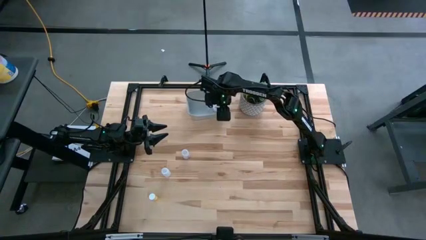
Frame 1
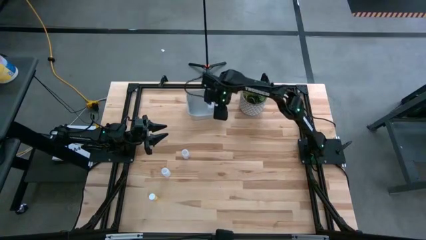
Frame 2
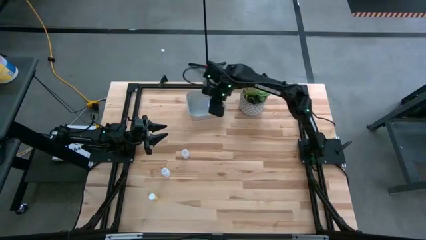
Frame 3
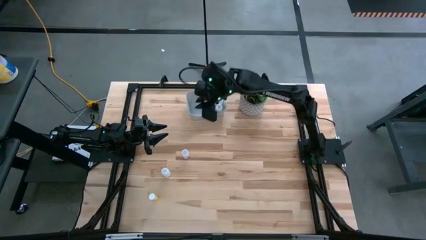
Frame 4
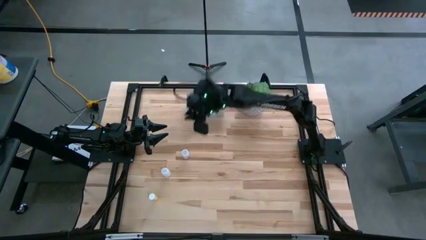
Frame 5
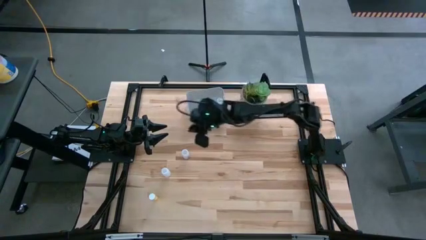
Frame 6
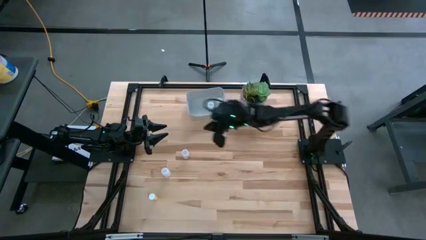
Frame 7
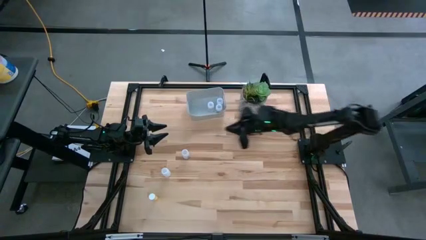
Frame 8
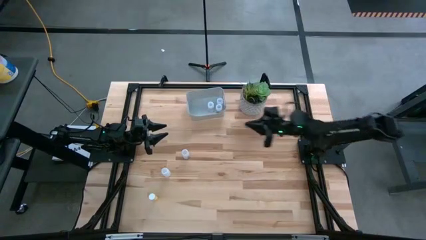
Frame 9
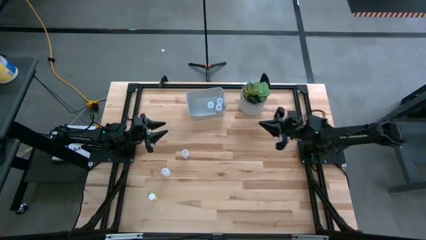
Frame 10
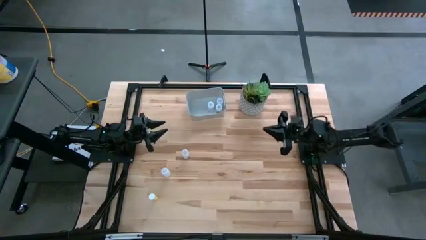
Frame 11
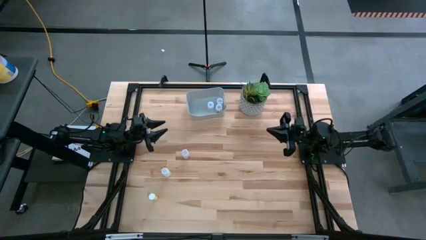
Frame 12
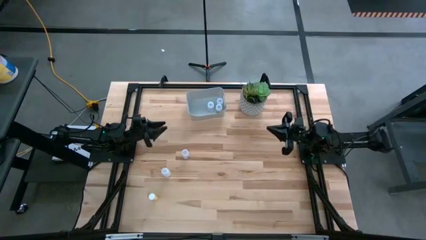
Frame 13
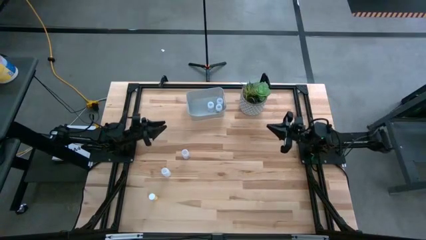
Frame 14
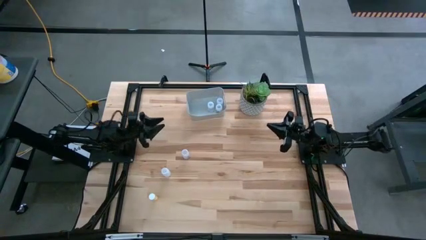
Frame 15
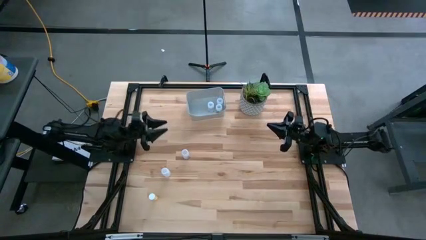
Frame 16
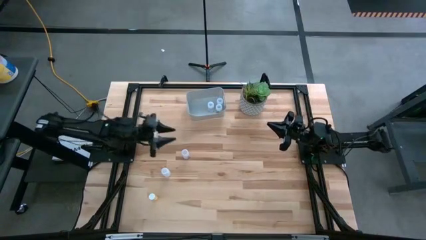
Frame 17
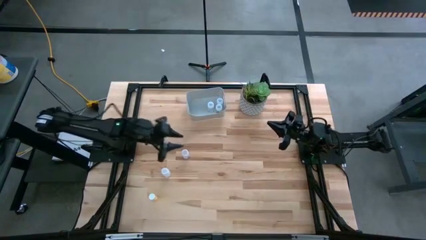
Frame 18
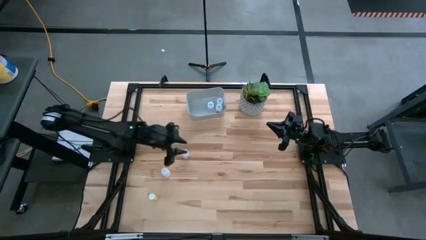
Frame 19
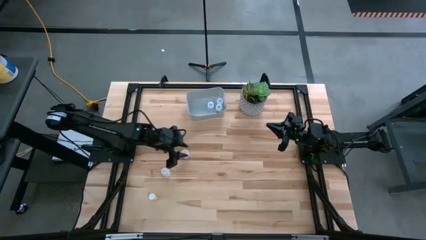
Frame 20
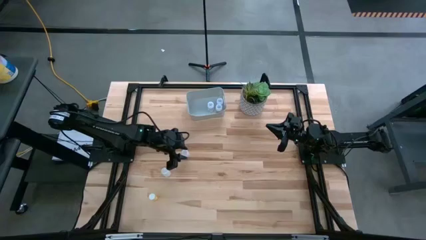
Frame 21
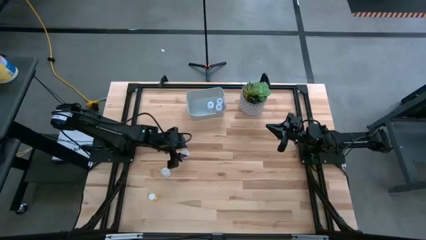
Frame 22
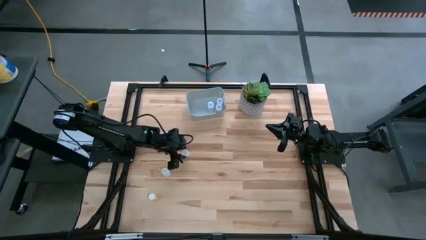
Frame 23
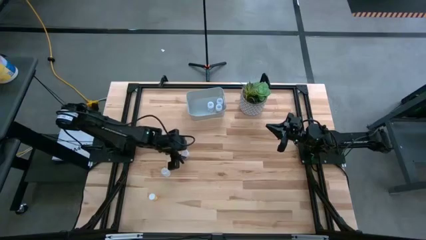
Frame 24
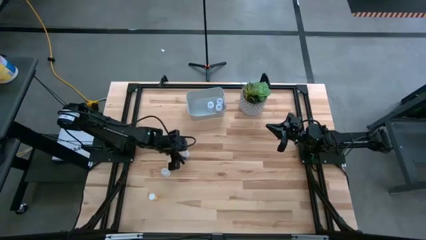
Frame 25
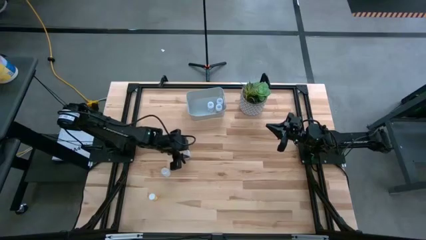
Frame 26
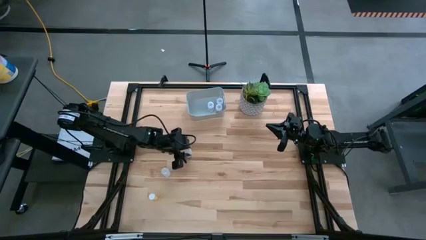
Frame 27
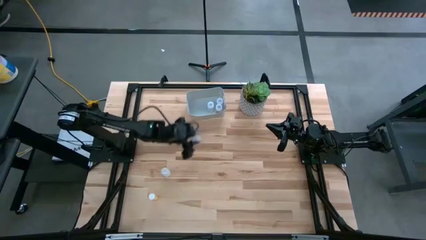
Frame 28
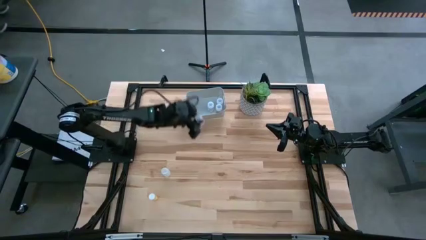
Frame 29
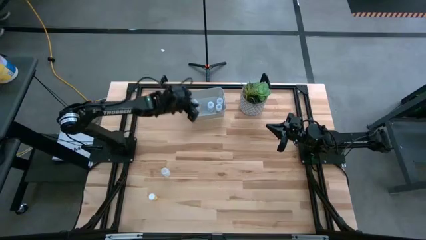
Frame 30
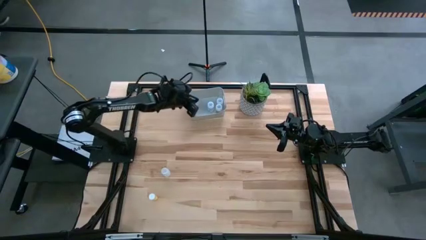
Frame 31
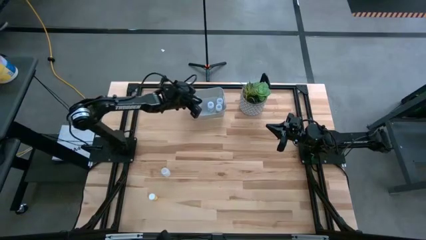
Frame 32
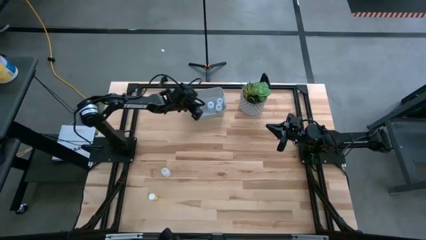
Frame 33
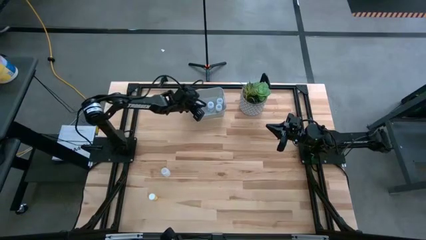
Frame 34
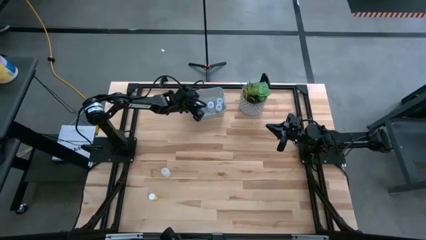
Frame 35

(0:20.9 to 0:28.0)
Task: Pick and place pill bottles into a basket
Put the white pill bottle into the gray bin

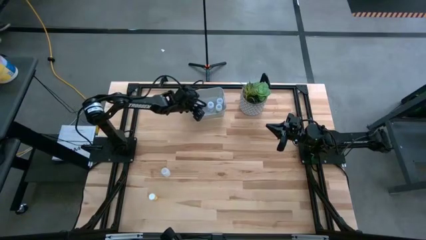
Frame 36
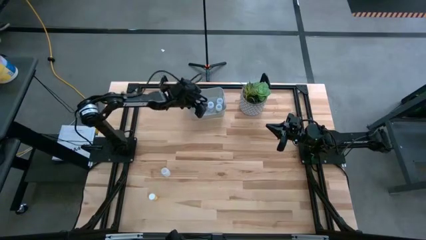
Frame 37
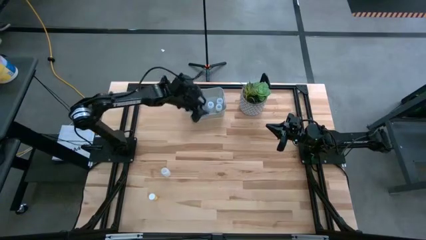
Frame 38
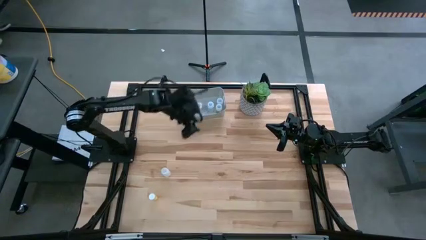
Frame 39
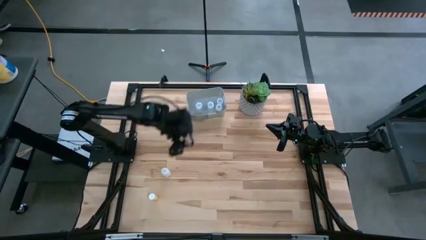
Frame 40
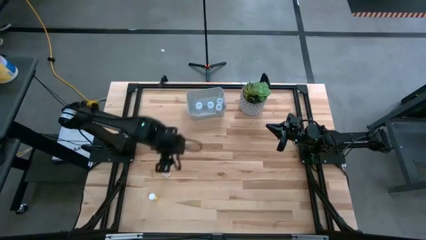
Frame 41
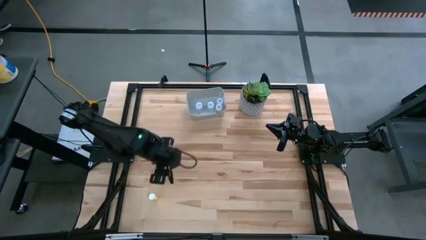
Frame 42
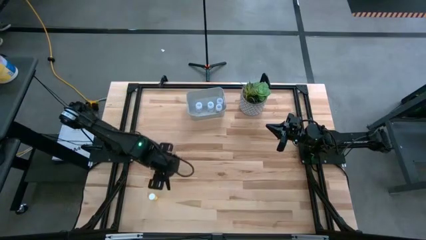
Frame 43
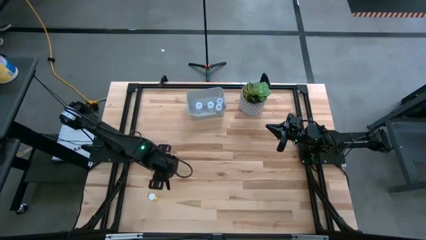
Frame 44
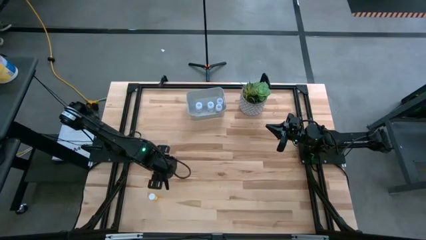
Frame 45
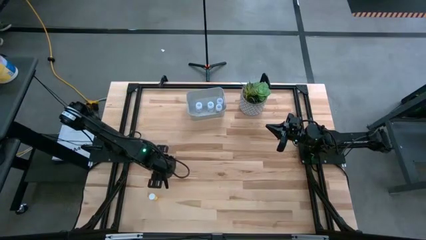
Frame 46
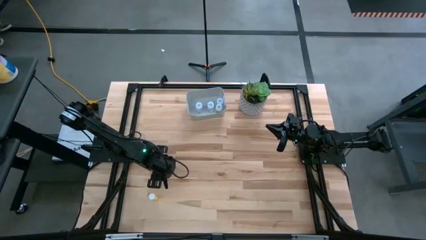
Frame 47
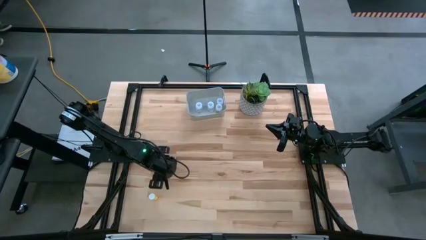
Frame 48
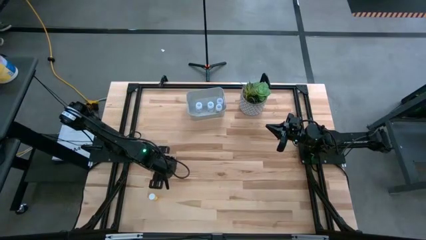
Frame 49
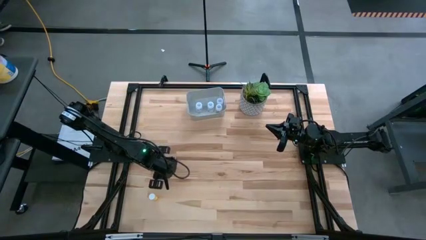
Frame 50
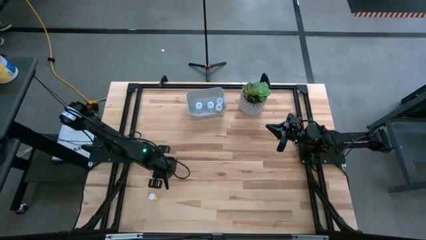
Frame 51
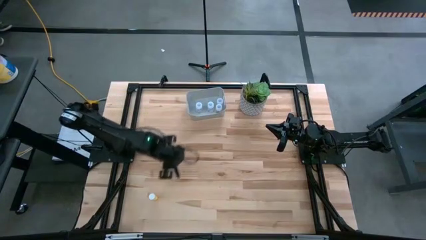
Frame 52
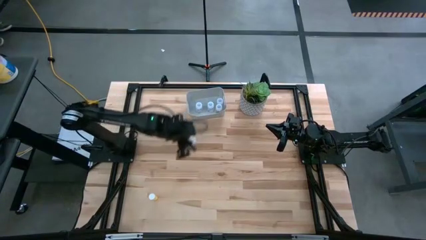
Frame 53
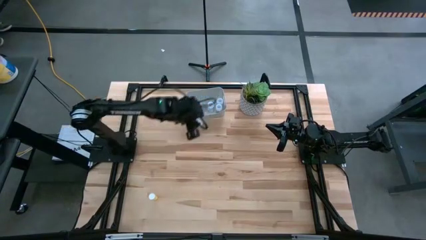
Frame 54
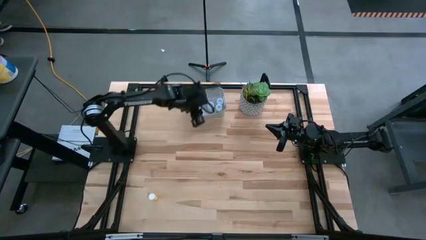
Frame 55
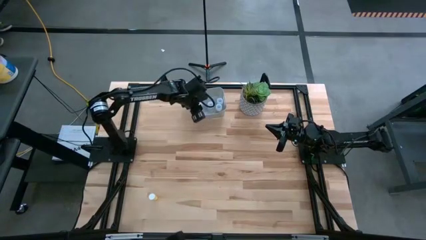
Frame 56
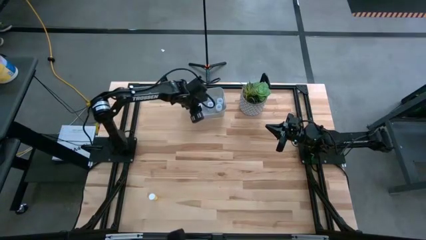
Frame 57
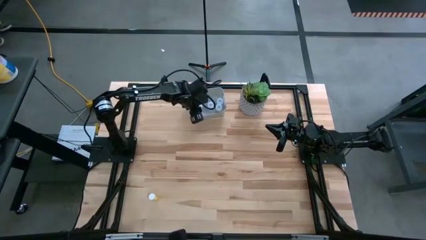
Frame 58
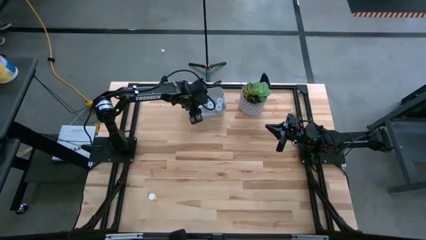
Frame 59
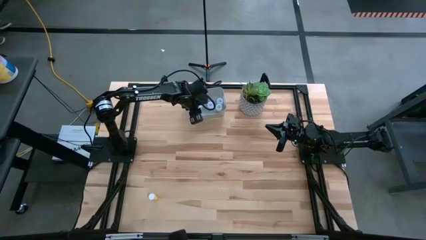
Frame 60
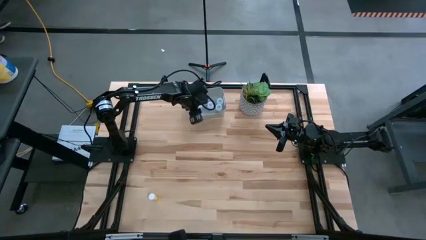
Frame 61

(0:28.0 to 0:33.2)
Put the white pill bottle into the gray bin

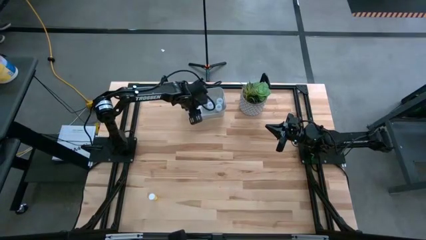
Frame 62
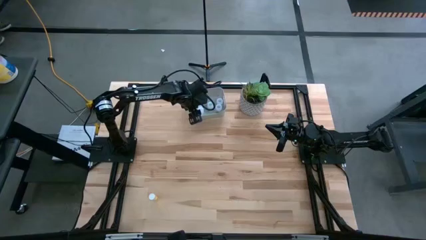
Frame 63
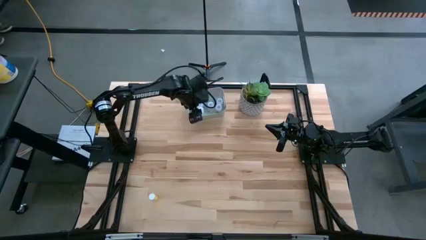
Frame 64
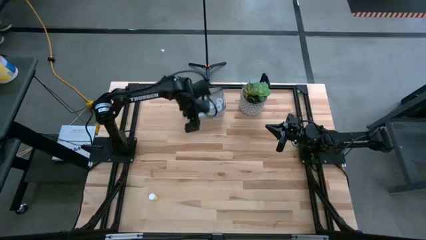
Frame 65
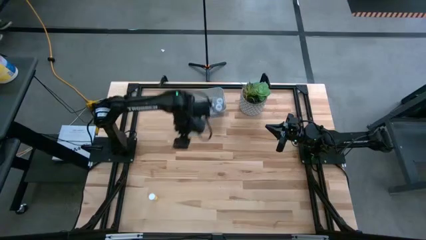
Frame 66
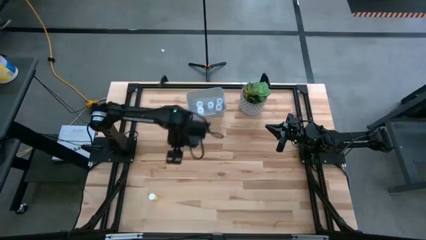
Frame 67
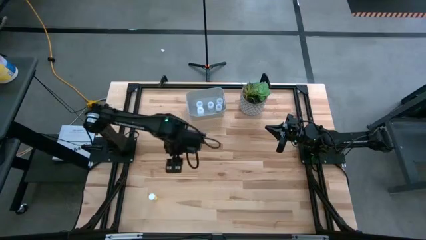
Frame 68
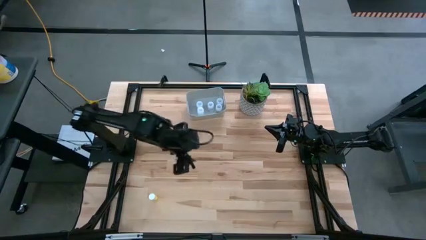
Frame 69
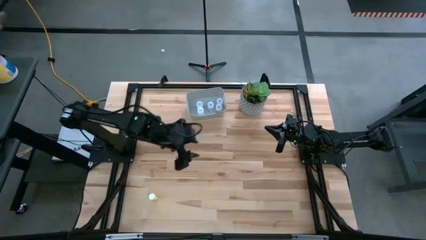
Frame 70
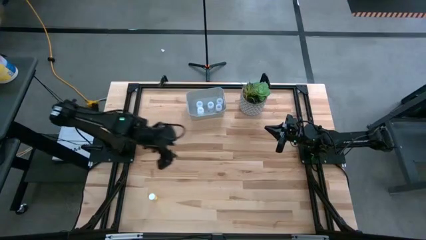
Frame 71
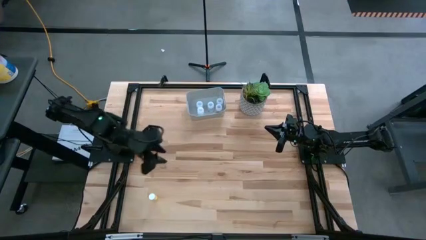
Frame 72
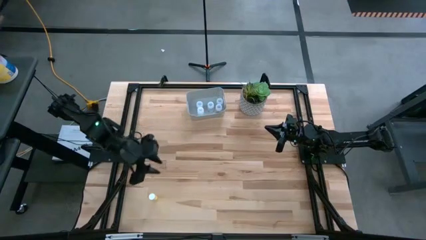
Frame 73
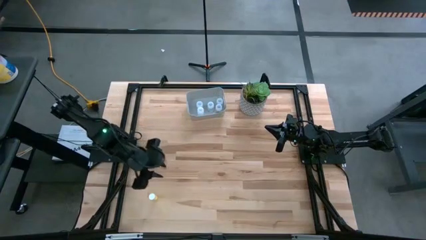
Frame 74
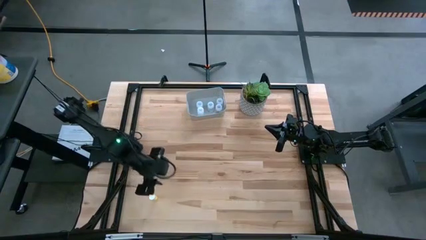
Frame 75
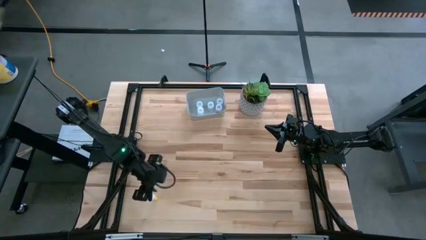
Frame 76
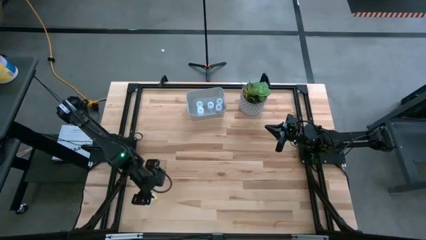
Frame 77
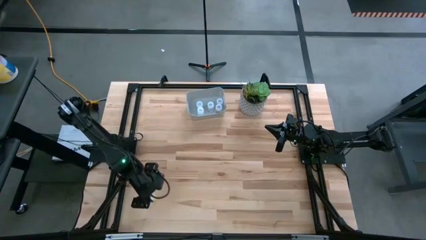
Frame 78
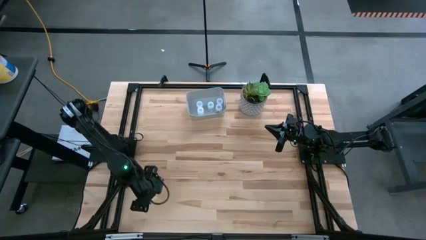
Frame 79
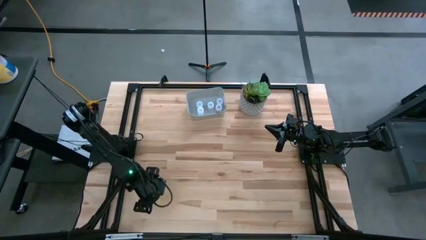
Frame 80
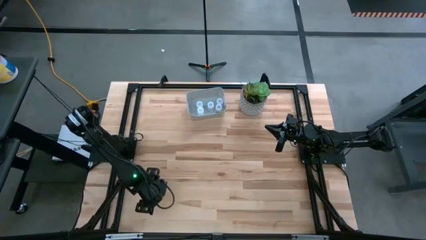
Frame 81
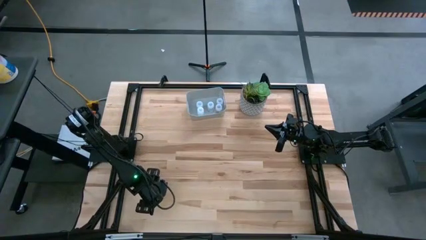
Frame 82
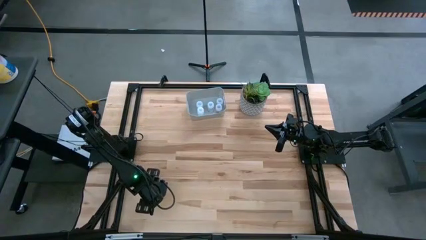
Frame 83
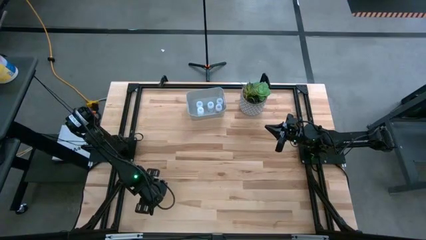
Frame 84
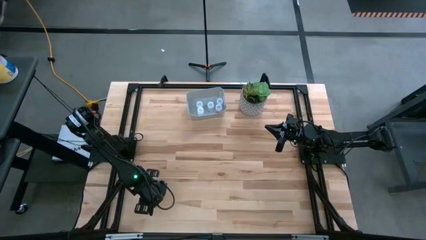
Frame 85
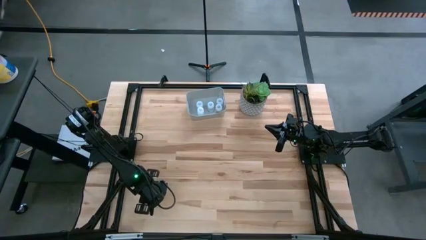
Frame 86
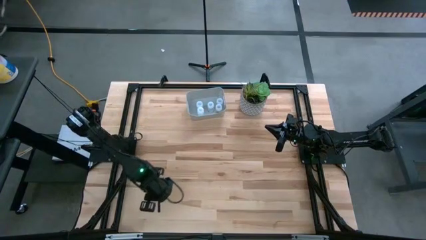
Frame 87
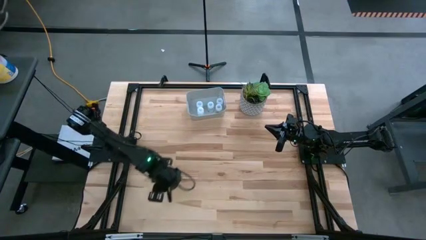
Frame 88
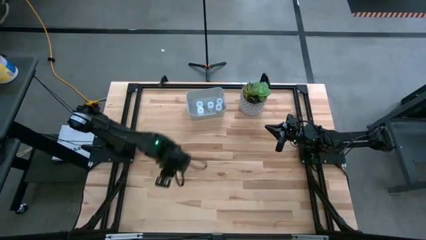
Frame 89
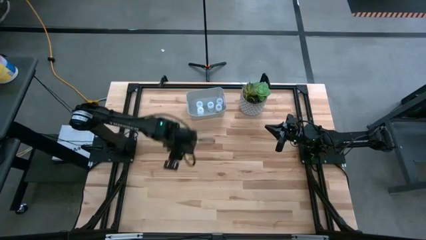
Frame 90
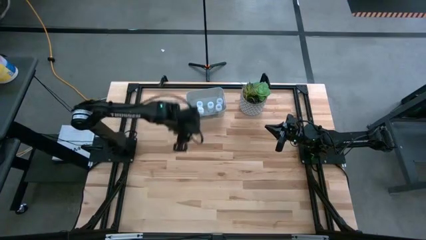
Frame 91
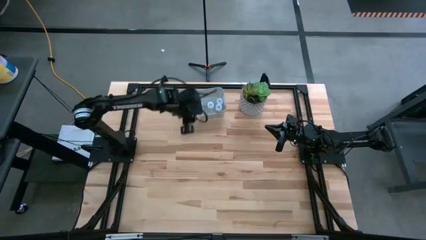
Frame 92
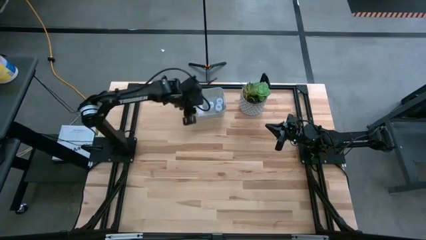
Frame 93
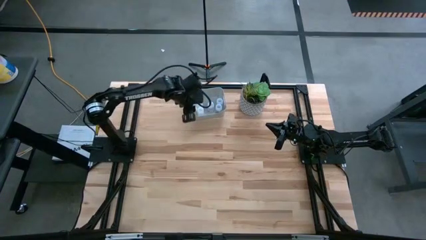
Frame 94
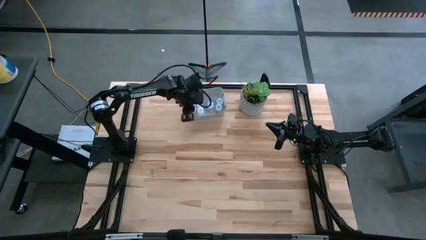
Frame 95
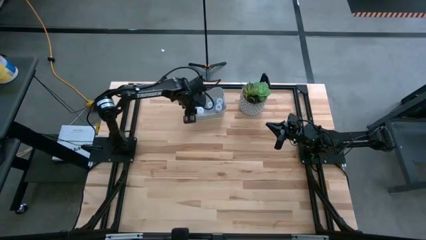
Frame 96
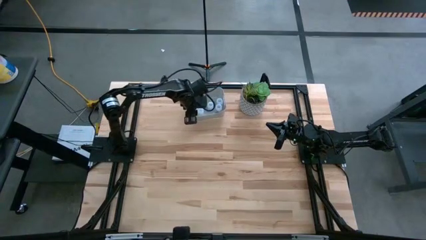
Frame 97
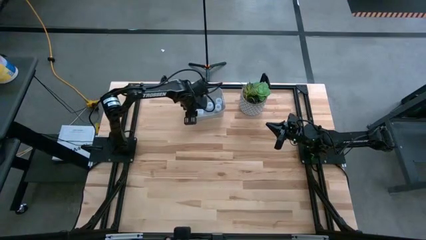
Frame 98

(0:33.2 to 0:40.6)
Put the yellow pill bottle into the gray bin
